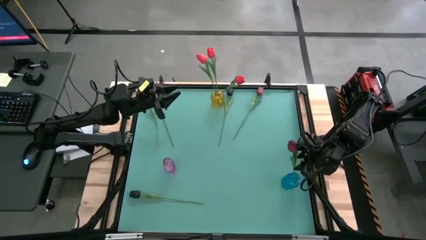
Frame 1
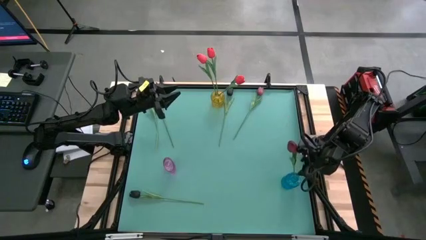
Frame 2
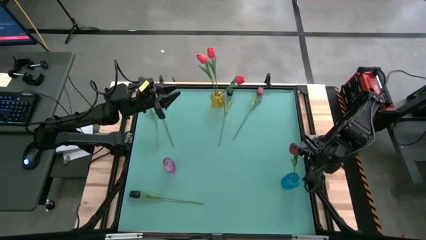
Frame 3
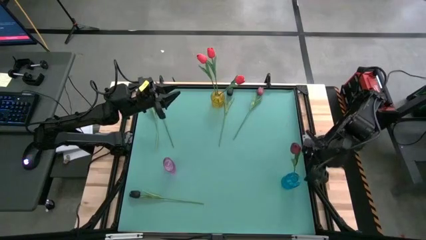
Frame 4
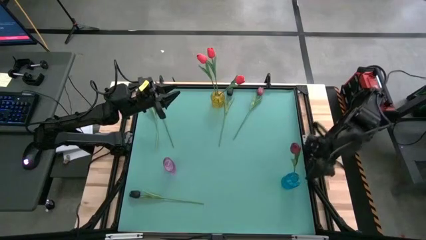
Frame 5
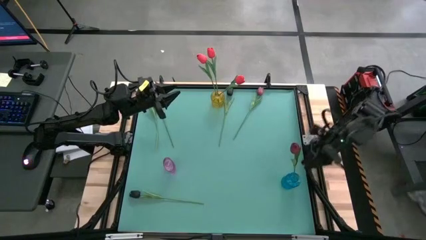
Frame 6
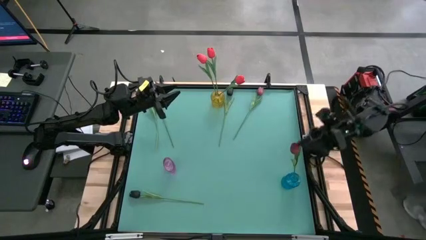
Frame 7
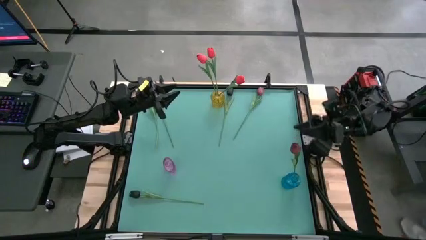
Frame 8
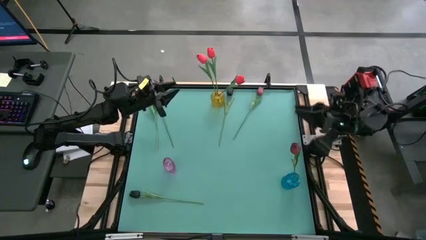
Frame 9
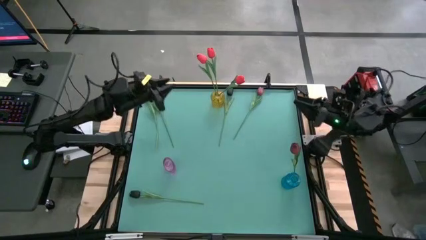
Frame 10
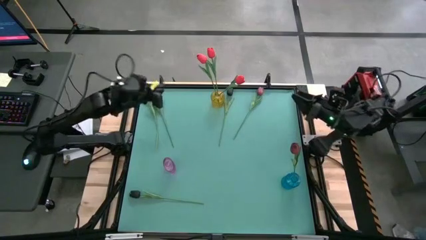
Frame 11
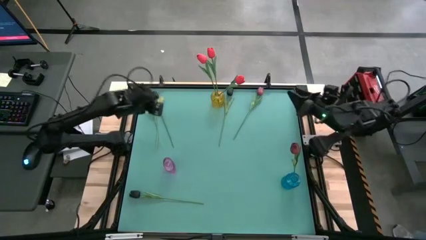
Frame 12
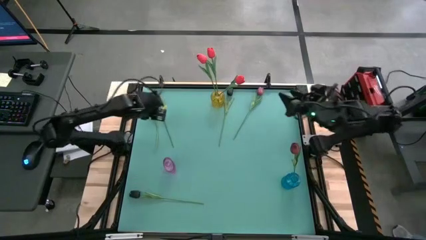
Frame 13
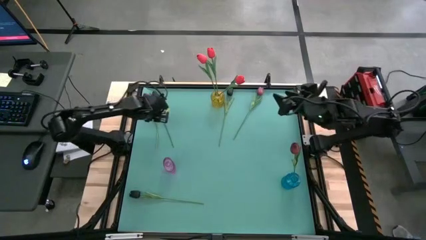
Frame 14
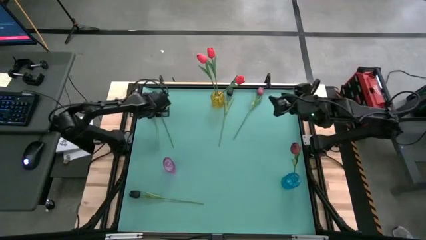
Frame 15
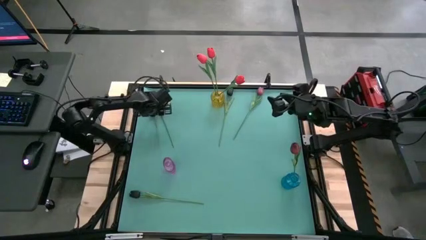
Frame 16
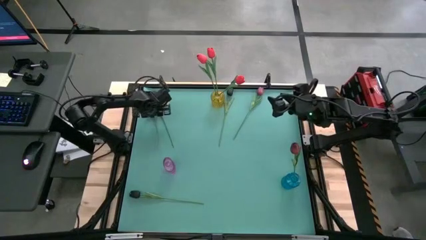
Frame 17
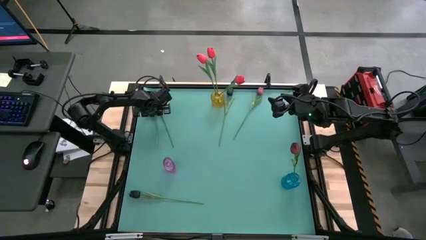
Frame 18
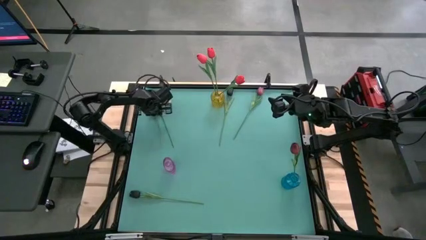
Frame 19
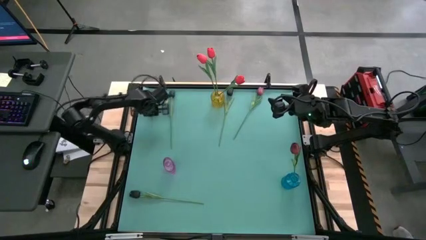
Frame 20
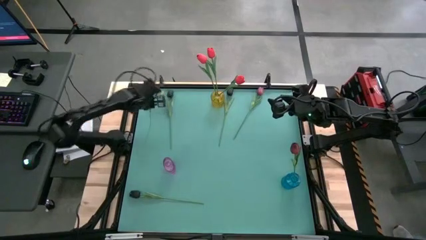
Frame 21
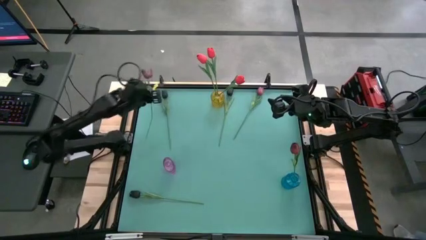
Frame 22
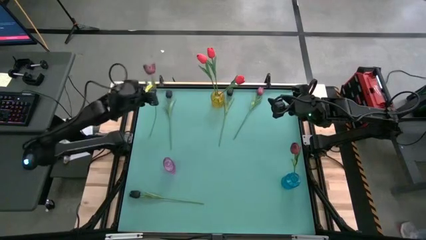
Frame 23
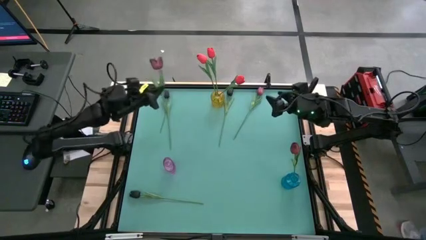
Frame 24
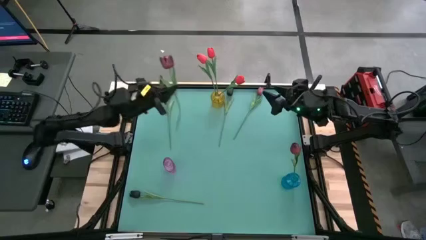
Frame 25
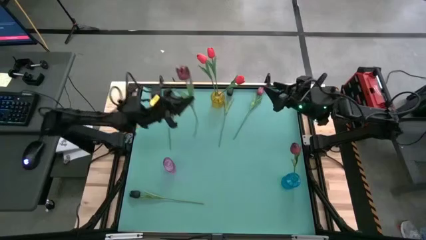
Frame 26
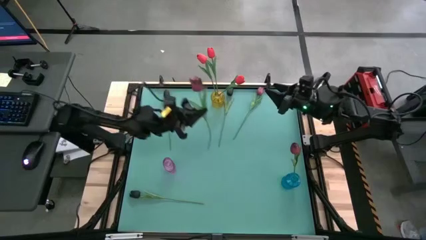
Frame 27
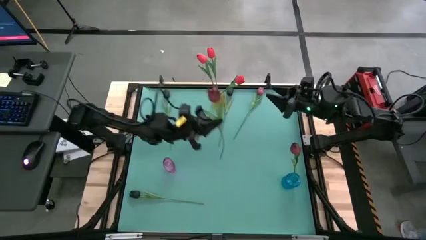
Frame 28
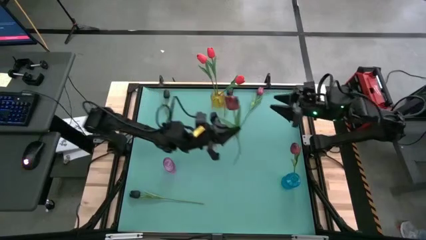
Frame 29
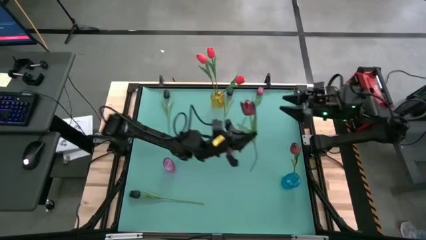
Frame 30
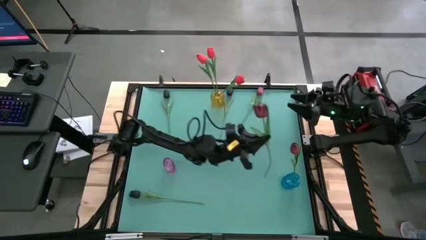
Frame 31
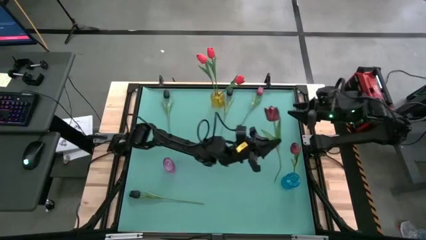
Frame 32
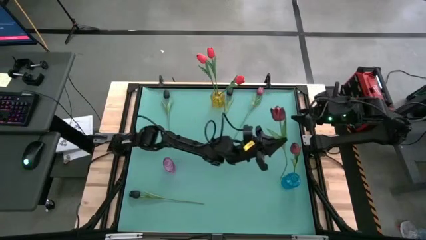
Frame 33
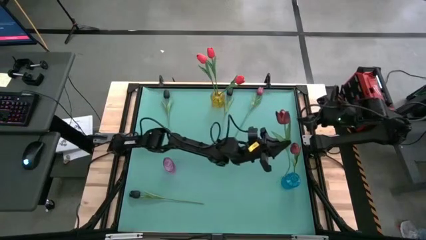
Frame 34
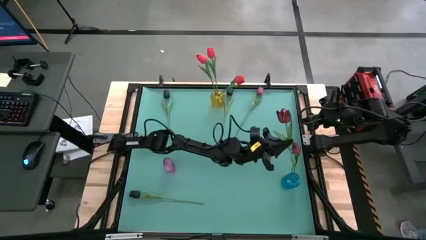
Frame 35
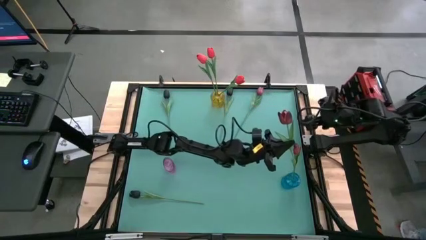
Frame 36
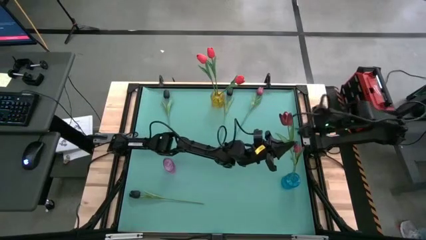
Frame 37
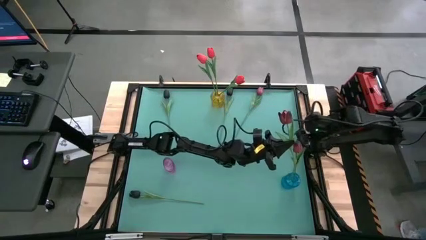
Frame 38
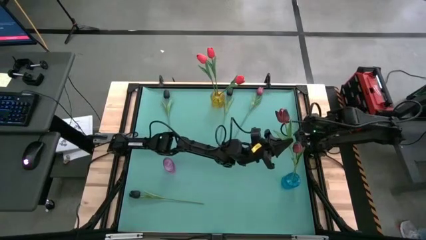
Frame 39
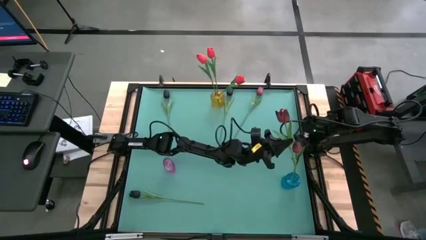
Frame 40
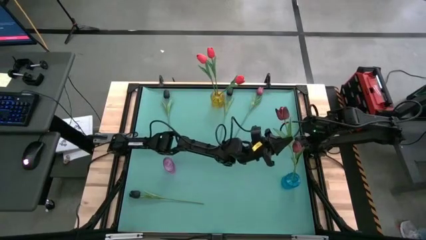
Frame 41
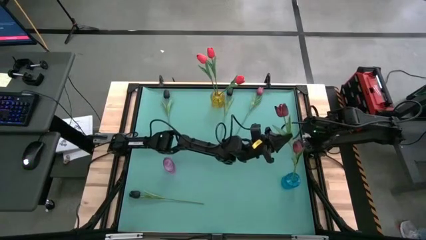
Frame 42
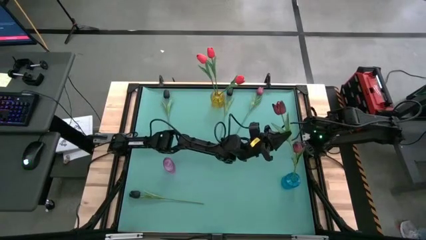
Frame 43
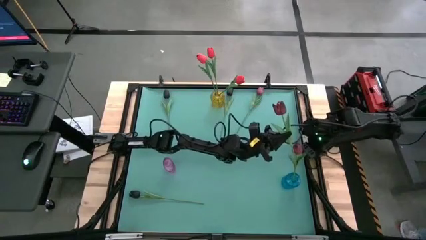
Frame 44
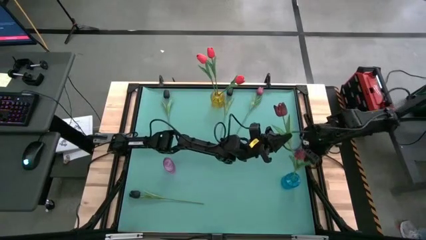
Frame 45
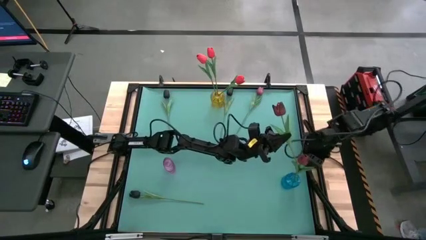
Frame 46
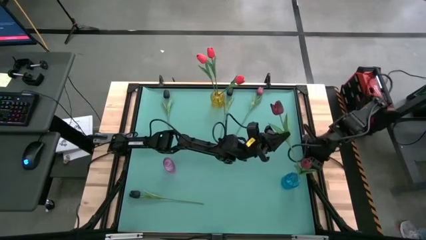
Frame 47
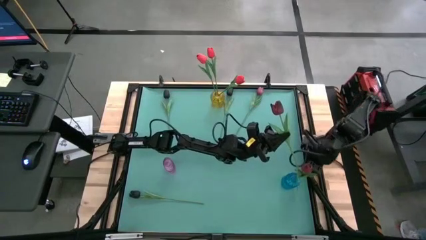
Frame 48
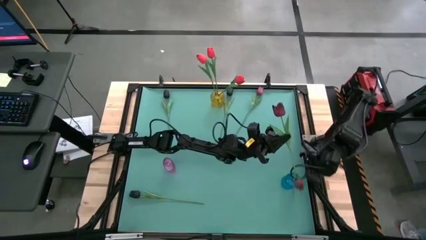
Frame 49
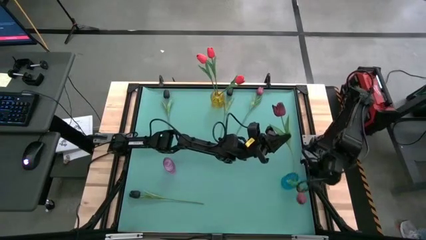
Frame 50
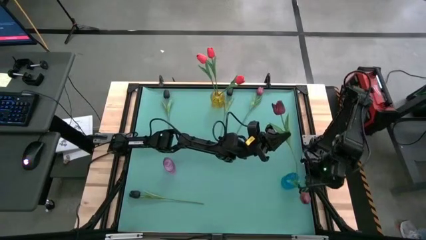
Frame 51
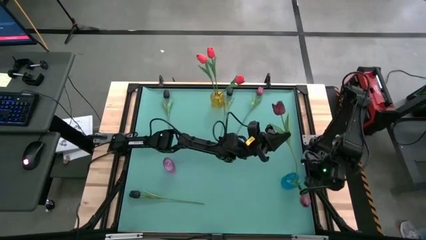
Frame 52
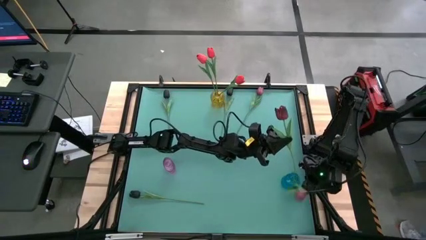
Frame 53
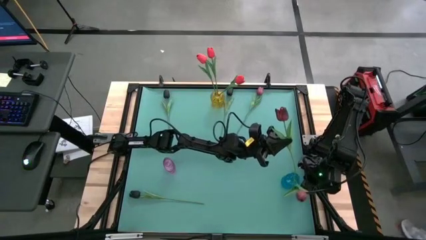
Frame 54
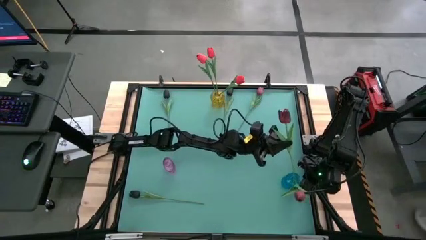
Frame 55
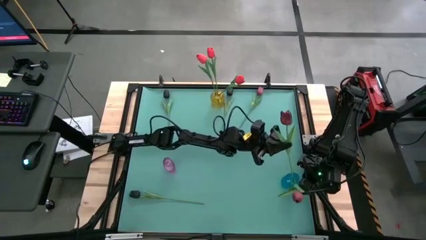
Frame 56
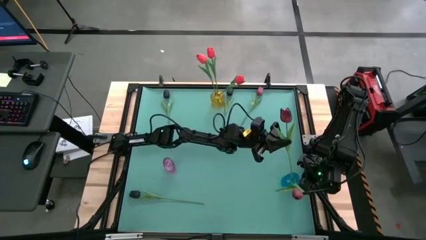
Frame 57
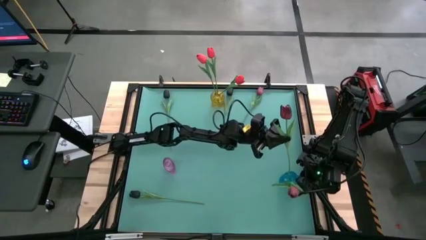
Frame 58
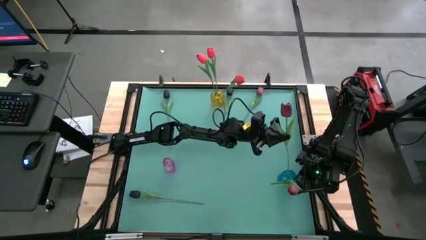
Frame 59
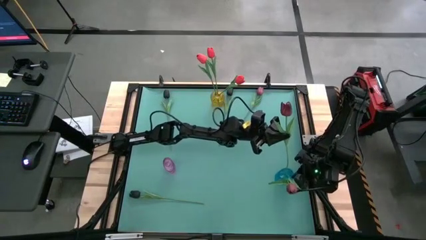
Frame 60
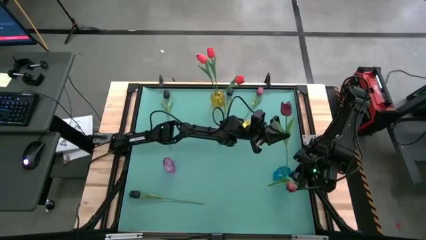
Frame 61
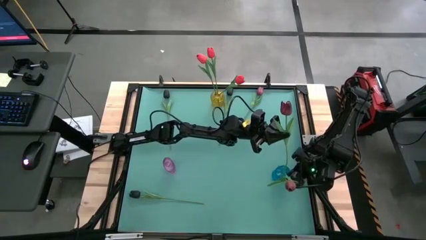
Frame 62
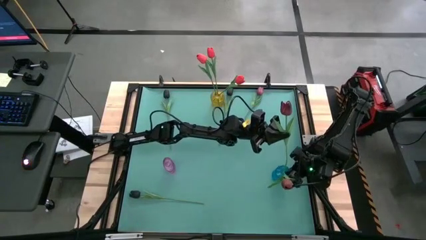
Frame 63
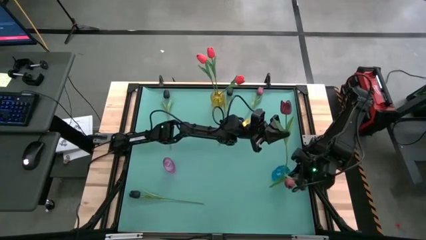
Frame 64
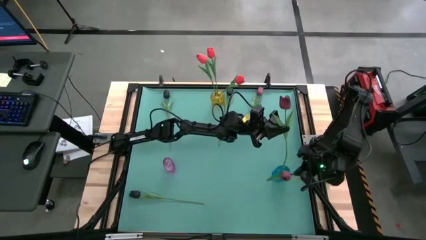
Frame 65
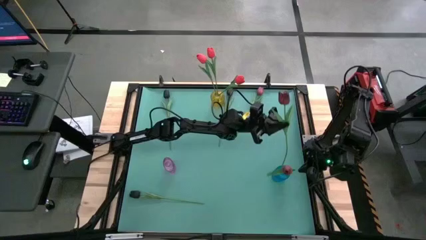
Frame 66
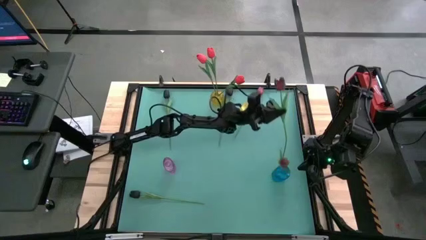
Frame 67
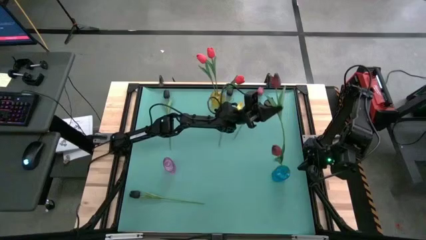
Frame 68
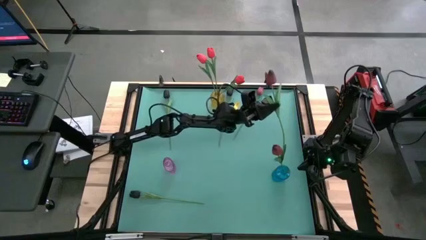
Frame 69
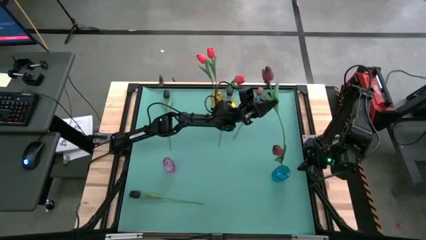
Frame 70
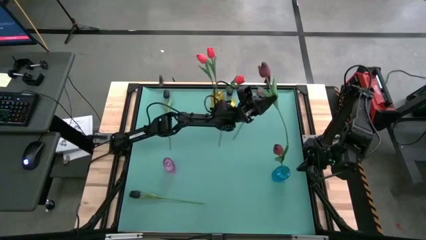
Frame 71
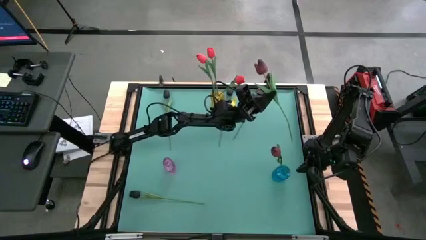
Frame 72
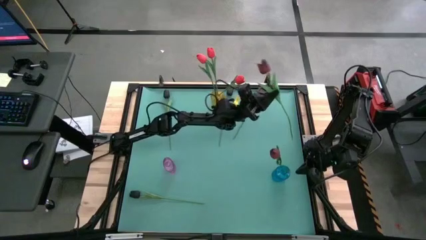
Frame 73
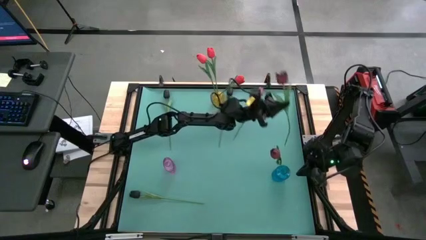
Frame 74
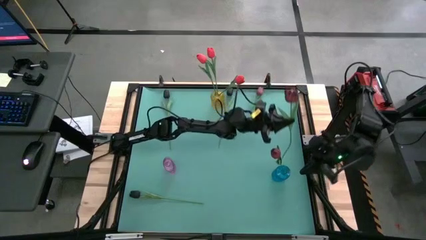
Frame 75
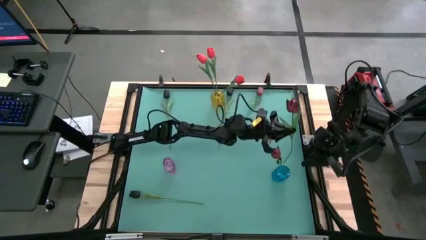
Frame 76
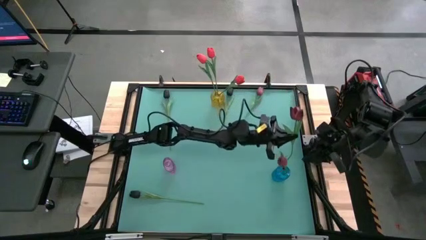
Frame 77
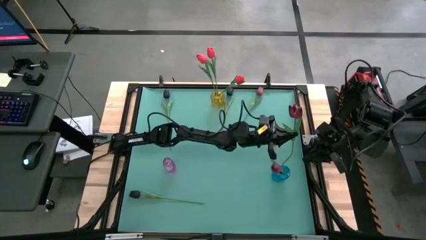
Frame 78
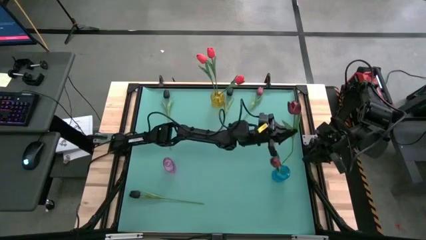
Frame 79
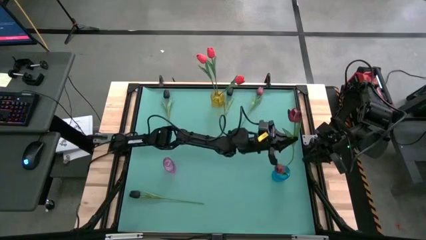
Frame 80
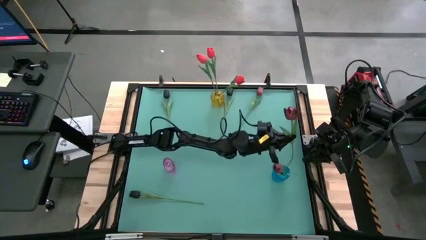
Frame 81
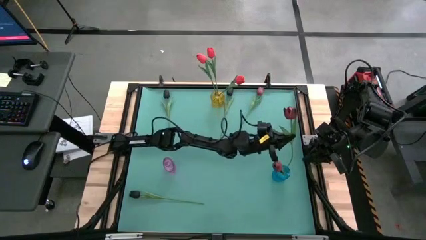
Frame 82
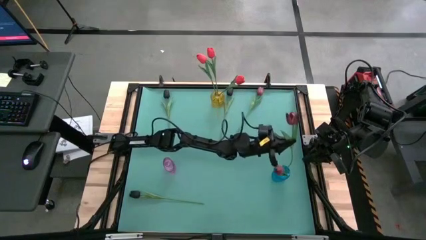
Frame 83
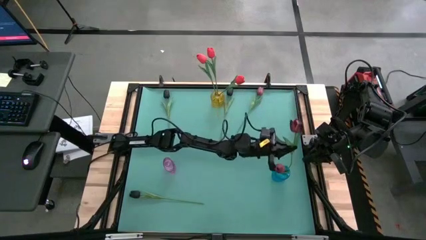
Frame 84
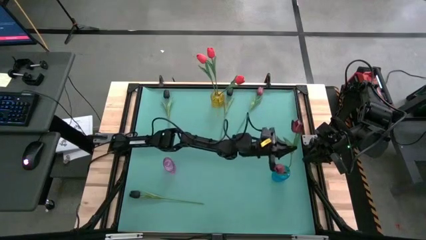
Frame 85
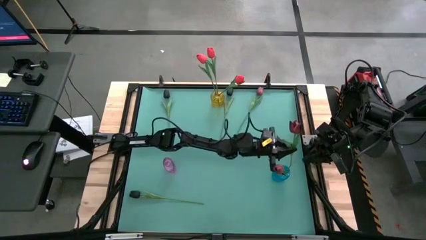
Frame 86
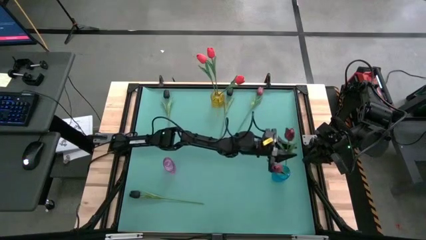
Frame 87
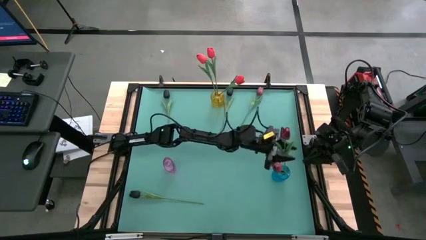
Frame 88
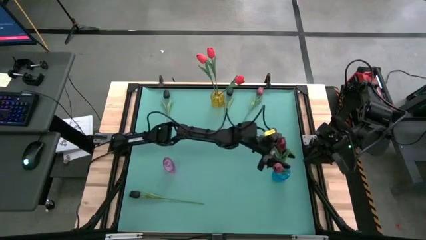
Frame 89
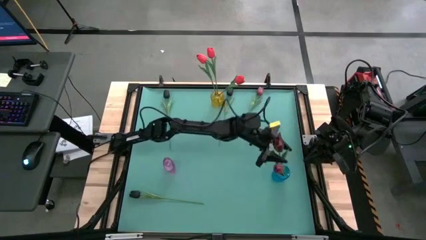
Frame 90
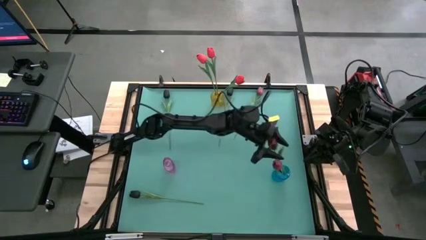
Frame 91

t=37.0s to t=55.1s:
Task: Sort flowers into vase by color
Put the left dark red tulip into the blue vase
